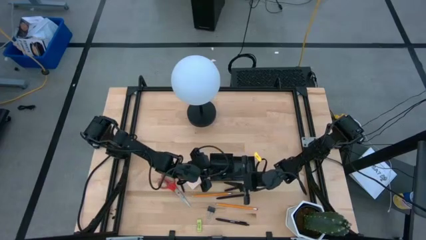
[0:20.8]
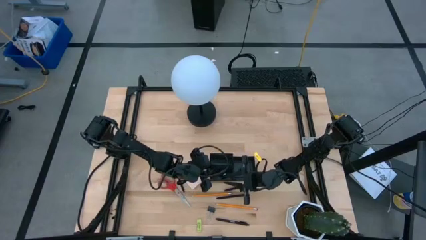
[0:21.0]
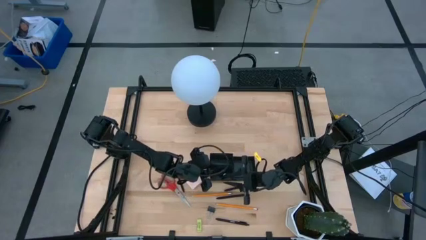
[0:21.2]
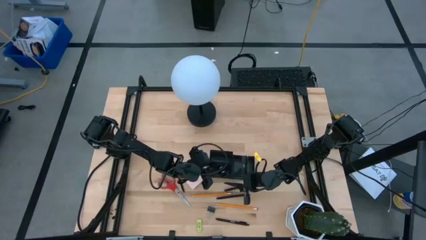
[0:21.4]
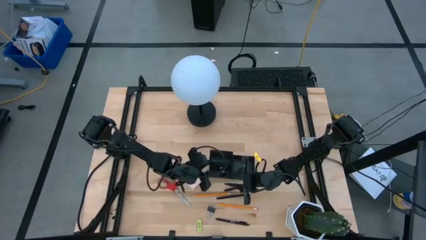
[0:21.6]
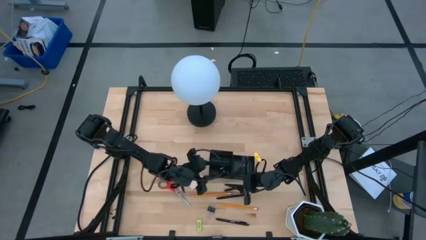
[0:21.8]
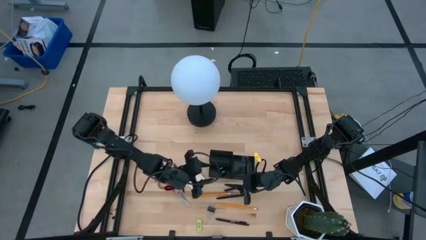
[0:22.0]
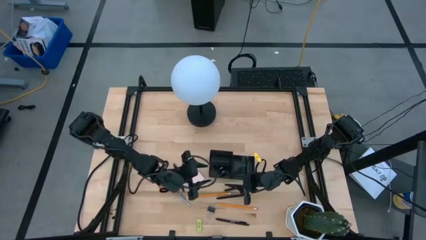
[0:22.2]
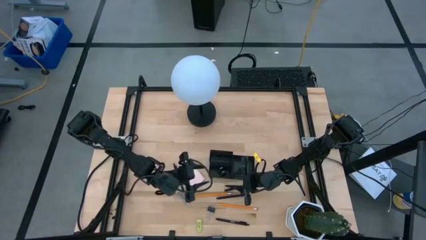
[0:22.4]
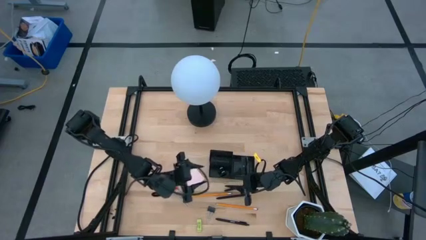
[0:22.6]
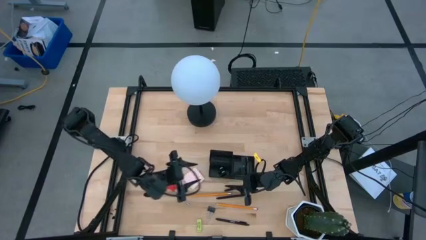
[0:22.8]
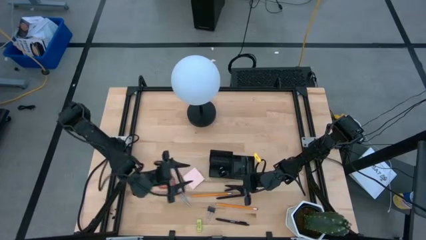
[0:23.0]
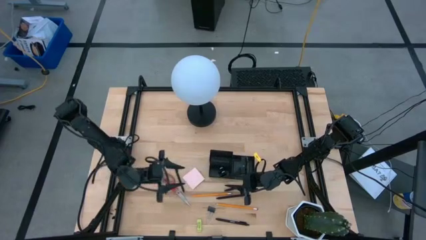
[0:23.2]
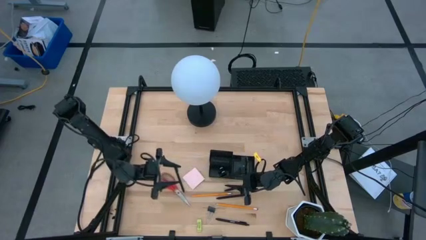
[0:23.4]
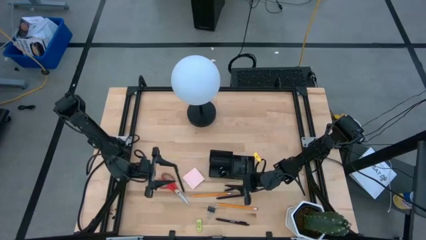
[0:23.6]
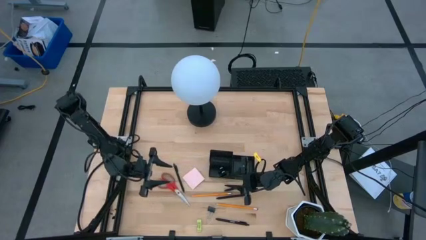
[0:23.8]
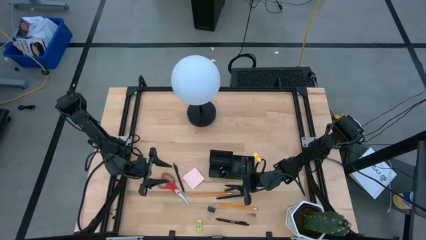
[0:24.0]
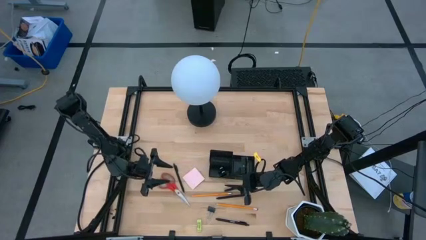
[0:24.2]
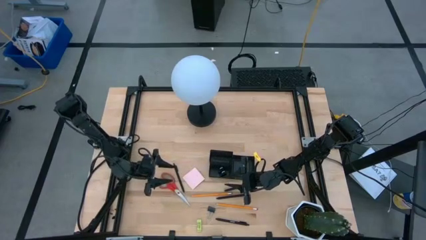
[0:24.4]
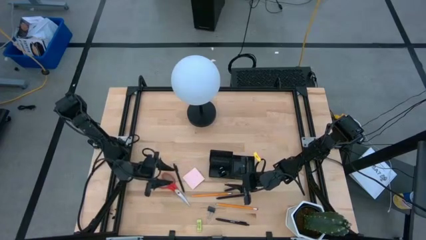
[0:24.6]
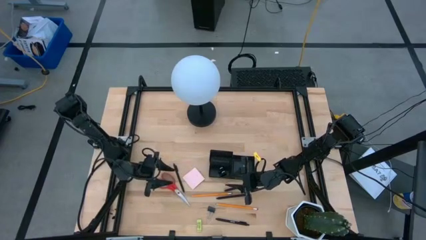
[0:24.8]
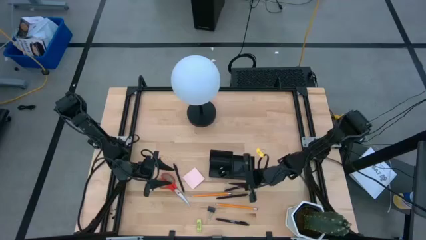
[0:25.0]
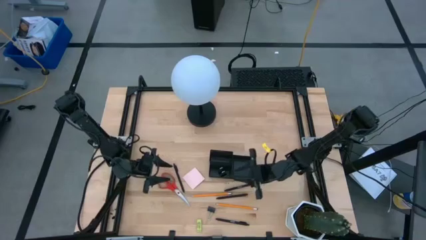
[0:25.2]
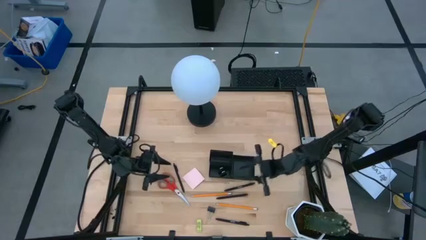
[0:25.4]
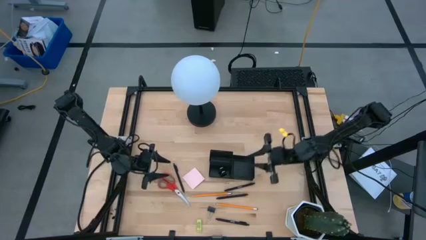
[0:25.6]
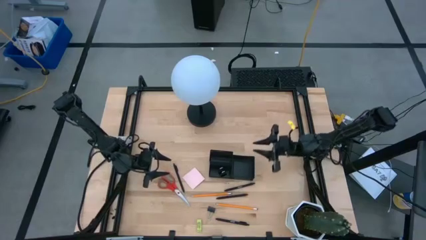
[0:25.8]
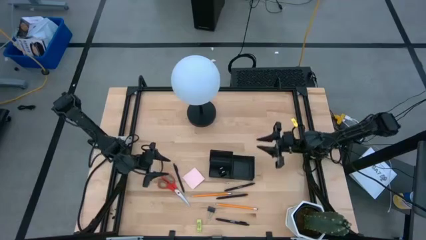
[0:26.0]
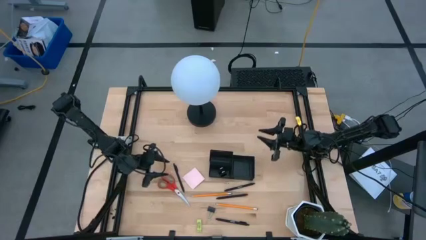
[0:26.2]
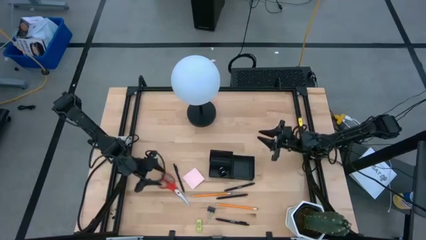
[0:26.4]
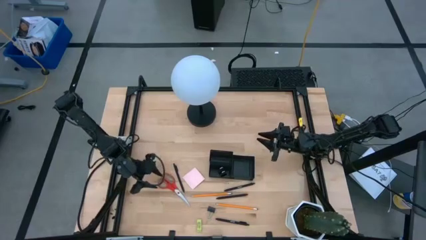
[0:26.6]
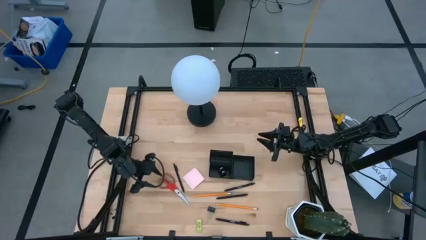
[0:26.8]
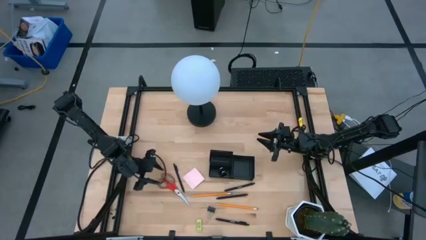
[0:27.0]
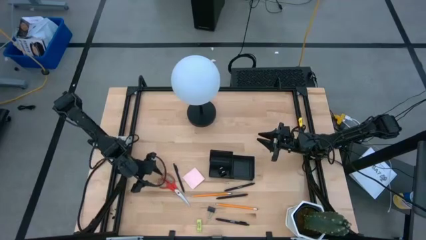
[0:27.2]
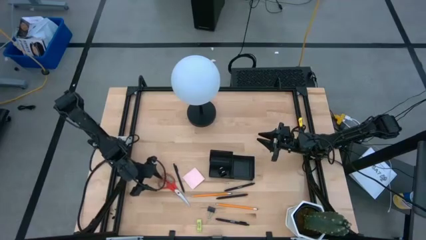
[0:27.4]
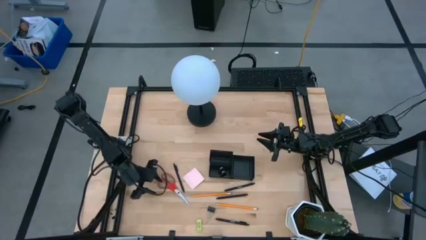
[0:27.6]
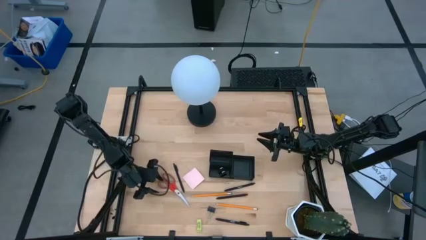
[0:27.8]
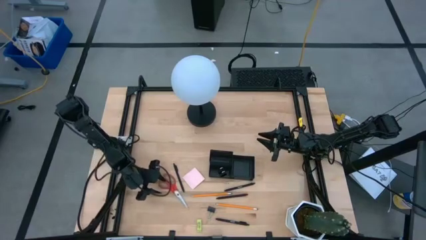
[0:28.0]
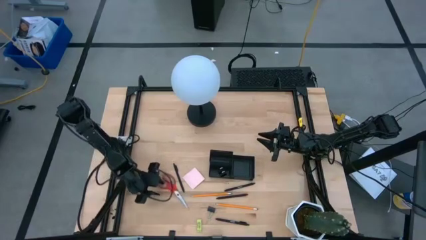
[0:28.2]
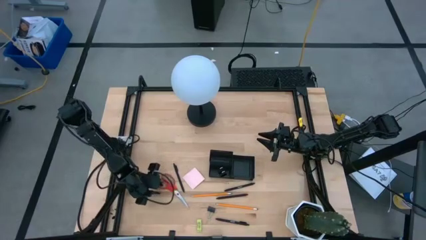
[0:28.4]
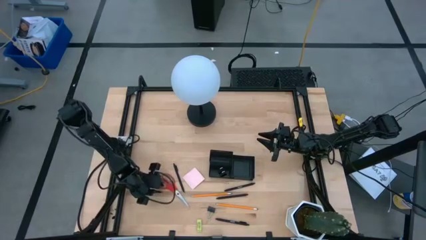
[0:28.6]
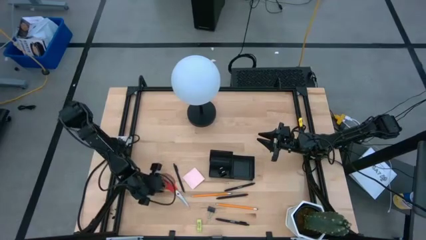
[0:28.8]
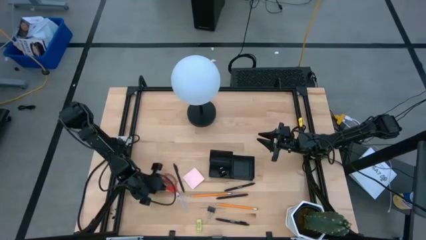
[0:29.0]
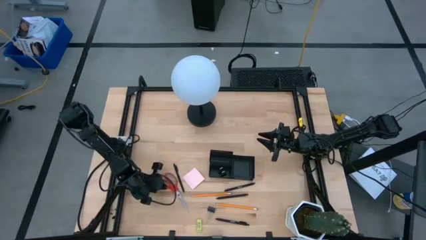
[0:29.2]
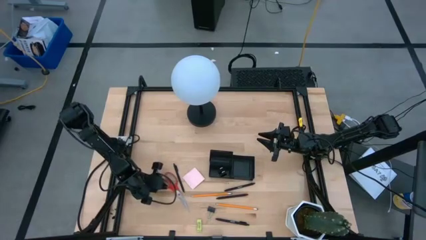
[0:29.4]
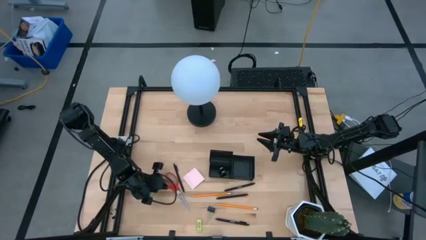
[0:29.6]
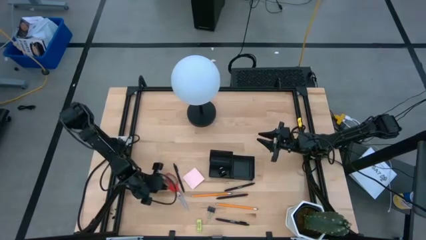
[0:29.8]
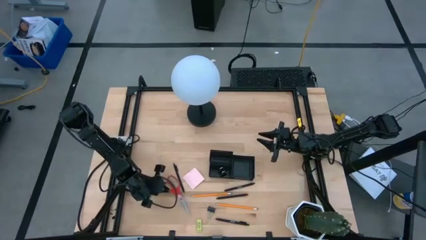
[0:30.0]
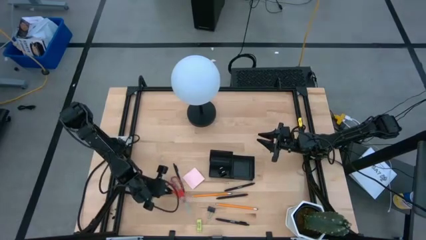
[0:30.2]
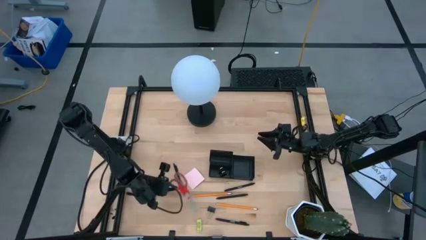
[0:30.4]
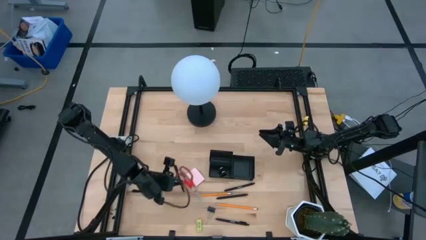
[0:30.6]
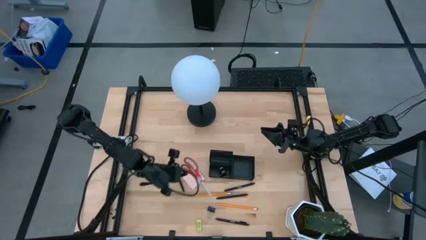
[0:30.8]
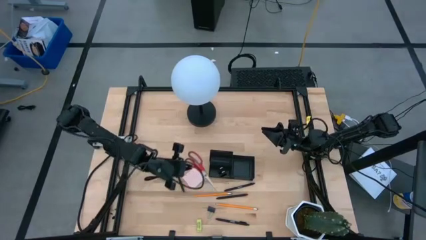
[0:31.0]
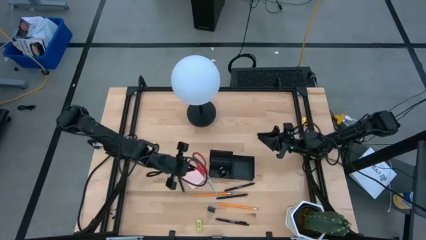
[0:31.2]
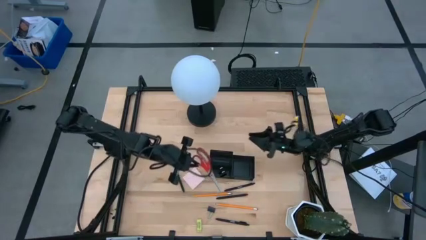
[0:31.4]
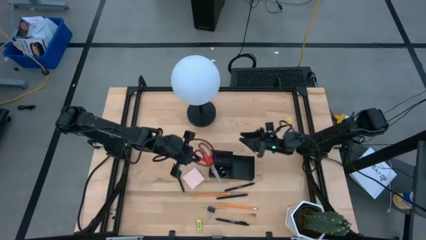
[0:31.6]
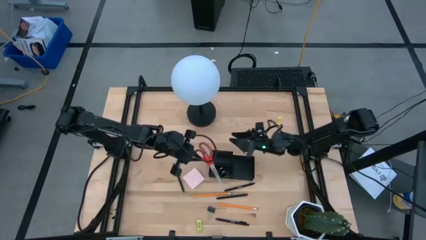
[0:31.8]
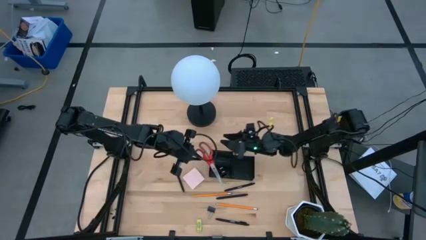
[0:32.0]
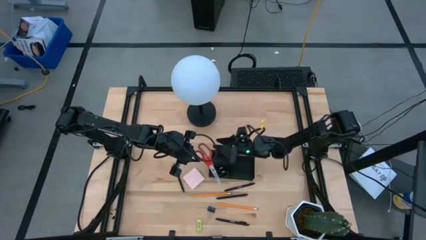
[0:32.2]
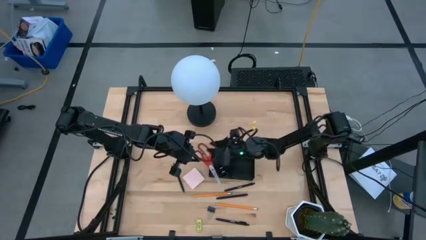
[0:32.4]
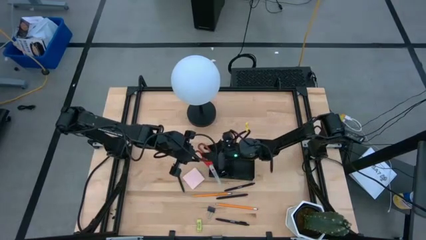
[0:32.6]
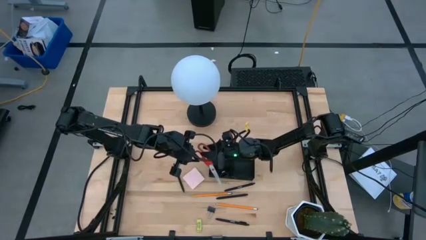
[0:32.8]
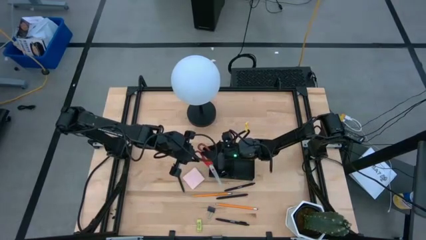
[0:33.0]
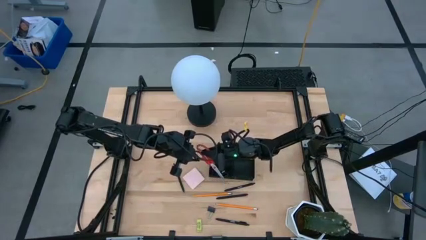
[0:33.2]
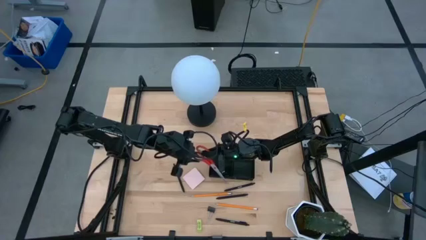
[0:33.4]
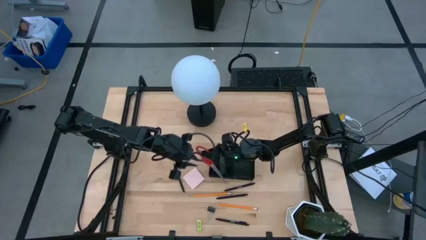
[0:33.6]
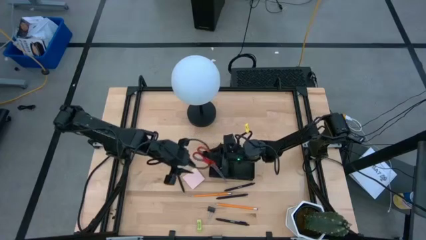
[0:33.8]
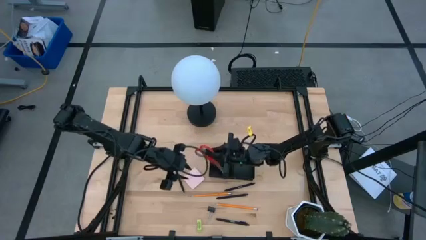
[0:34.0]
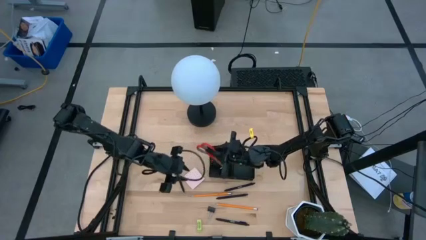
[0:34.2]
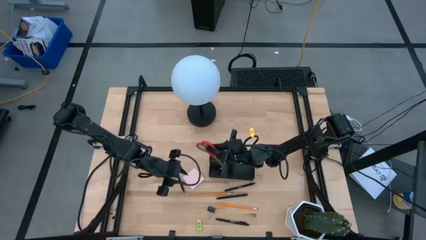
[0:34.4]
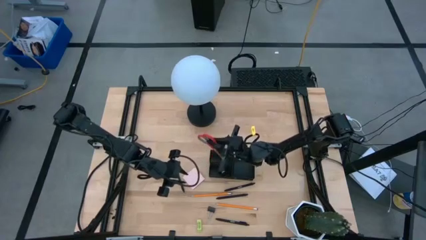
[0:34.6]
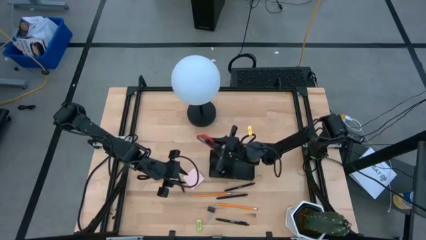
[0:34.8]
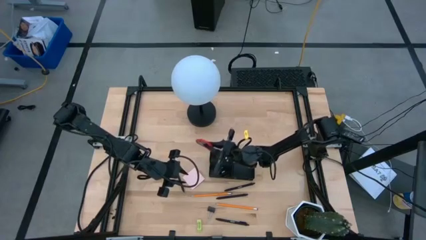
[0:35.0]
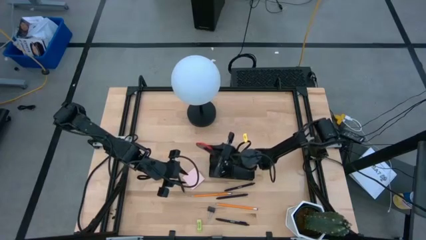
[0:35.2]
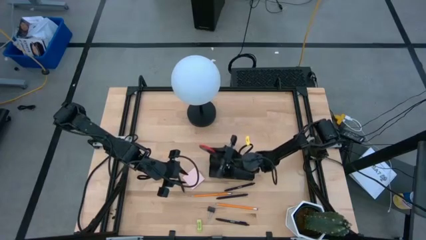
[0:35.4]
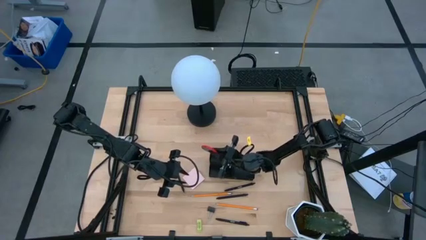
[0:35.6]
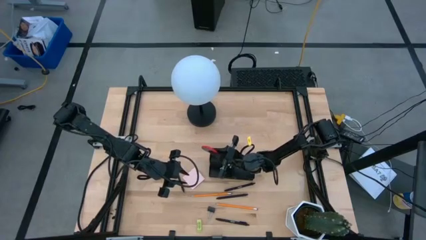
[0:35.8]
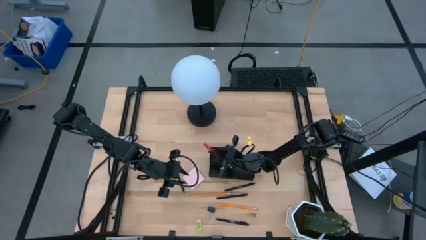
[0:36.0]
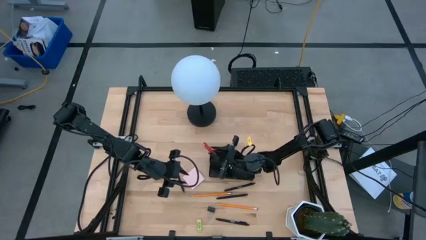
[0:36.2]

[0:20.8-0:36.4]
Task: Pick and place office supplies into organizer
Put the red scissors into the desk organizer
